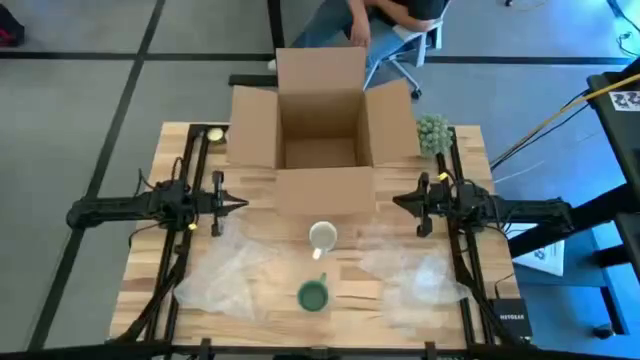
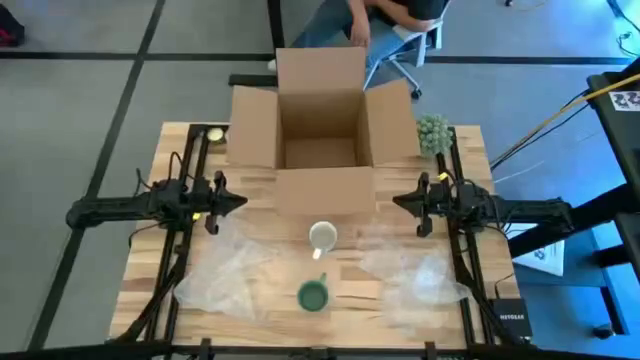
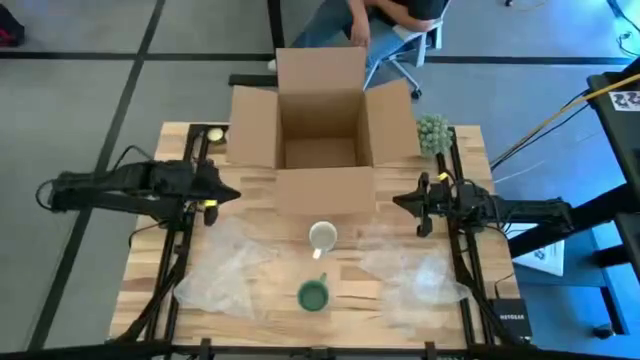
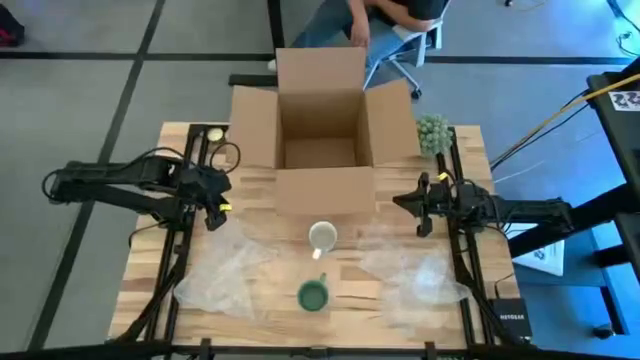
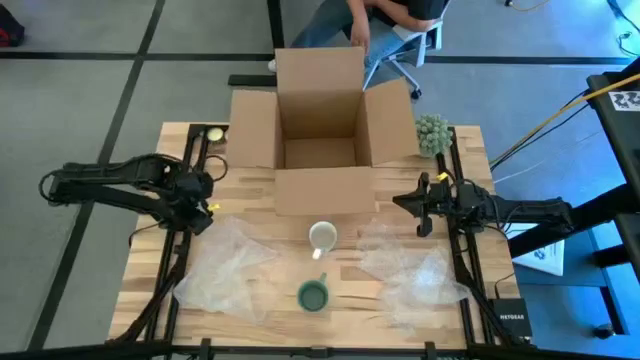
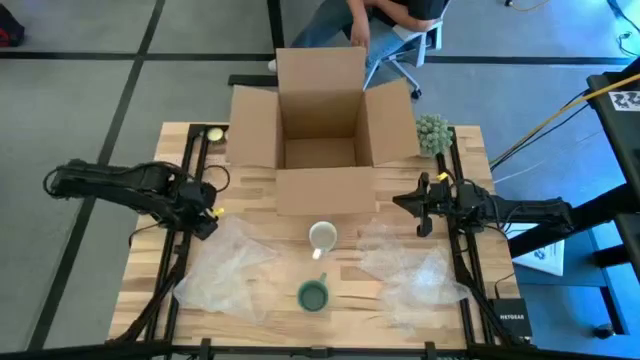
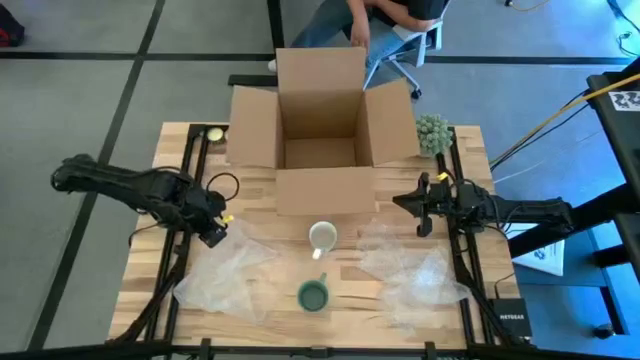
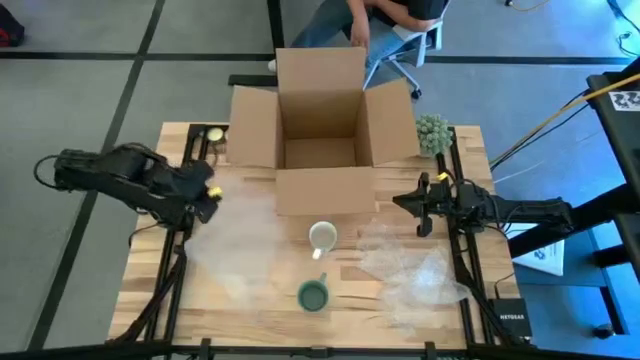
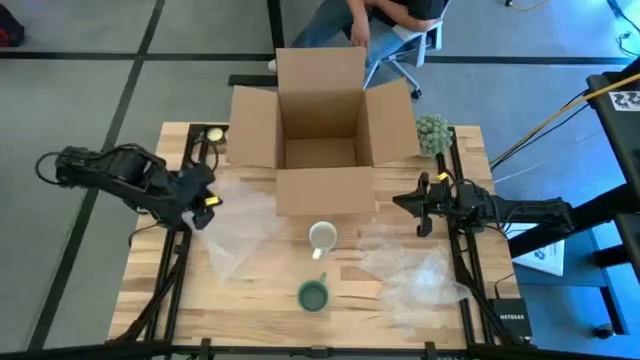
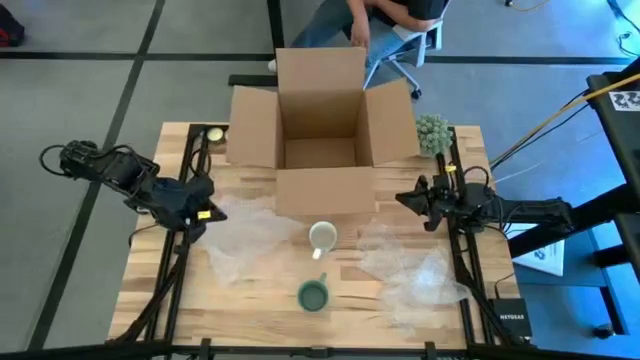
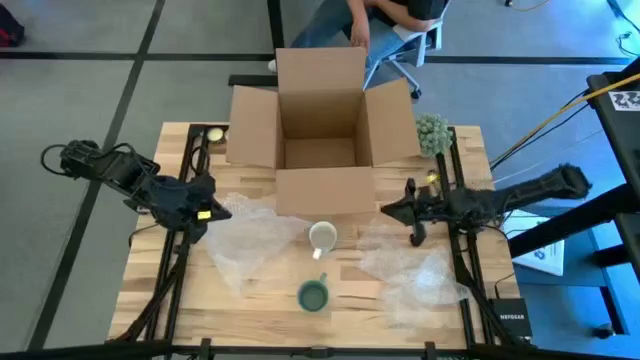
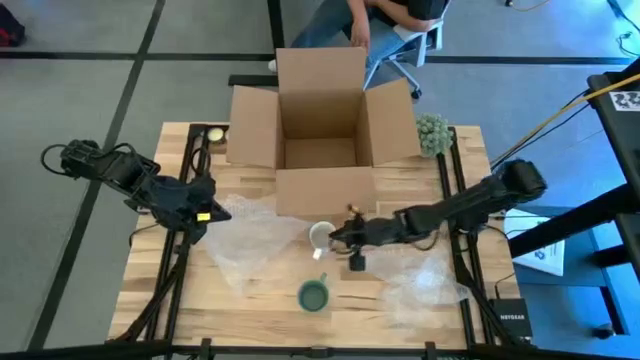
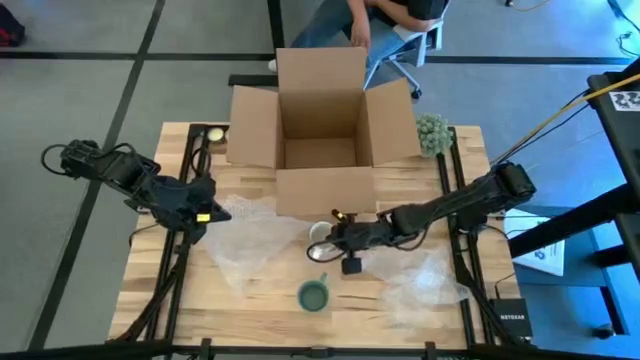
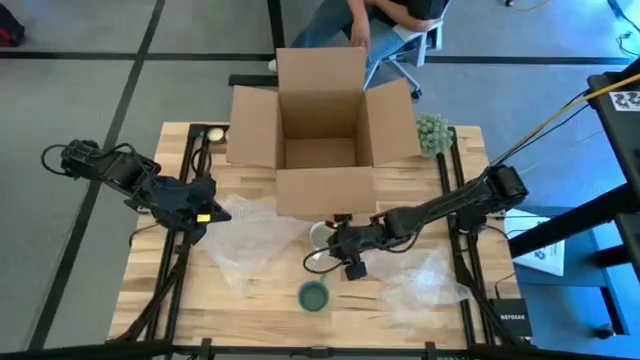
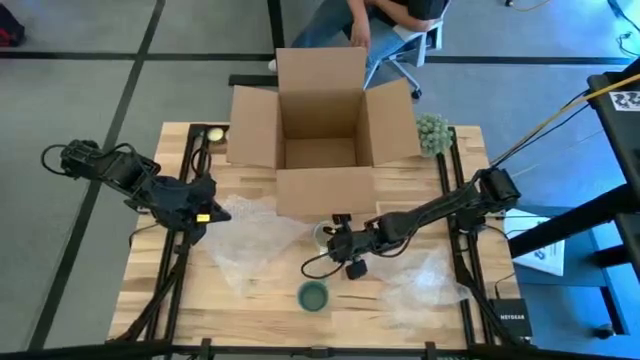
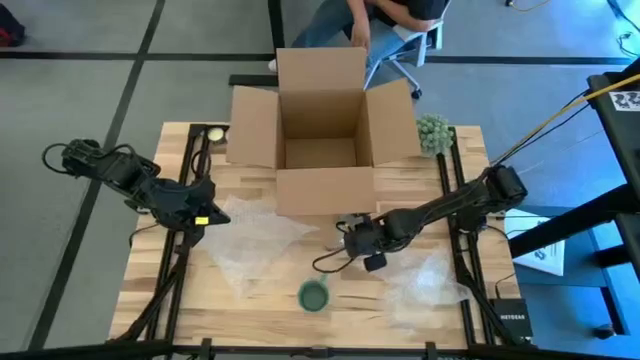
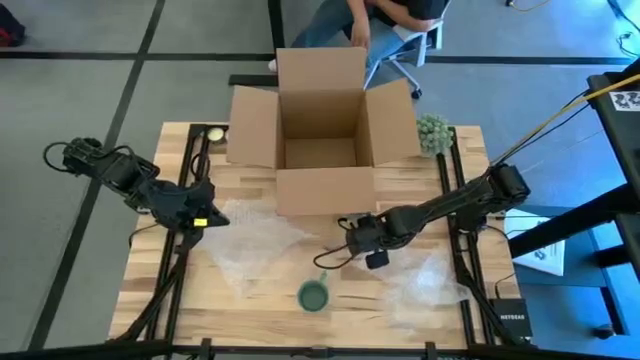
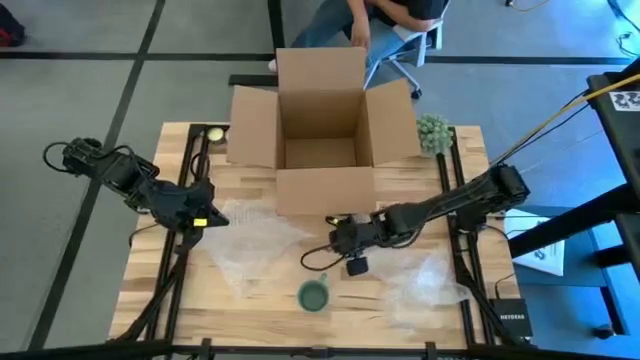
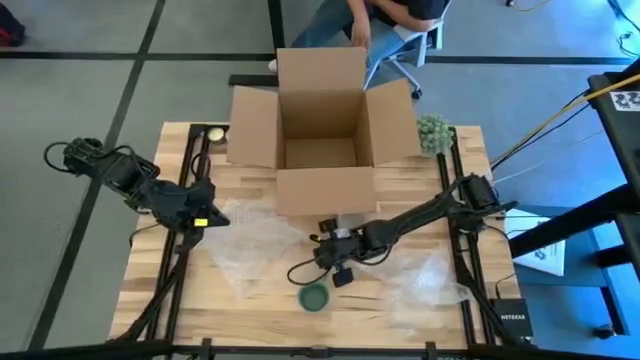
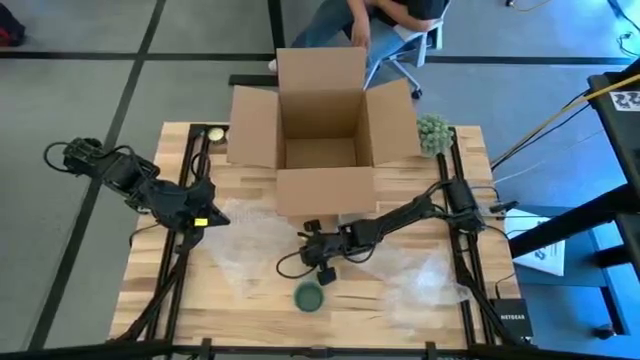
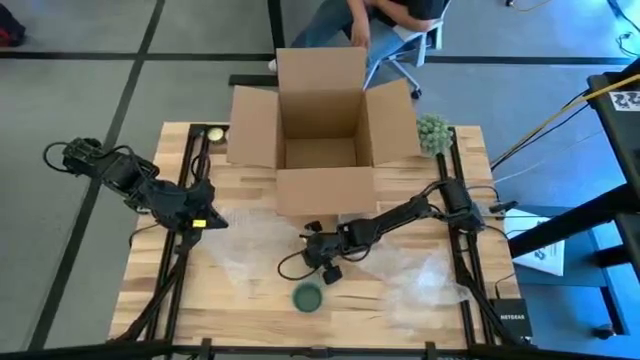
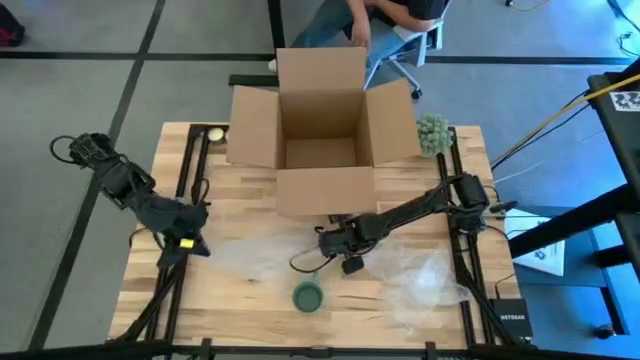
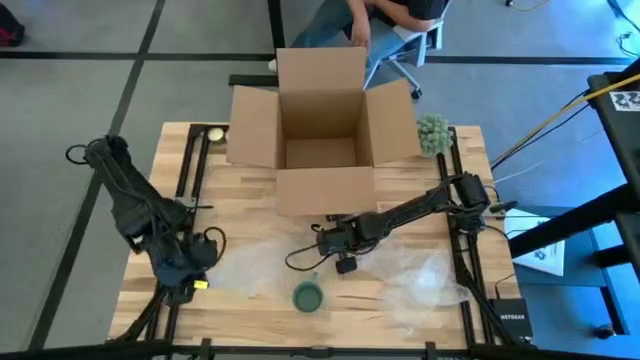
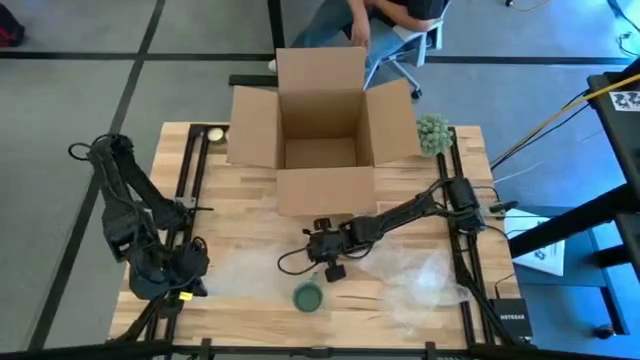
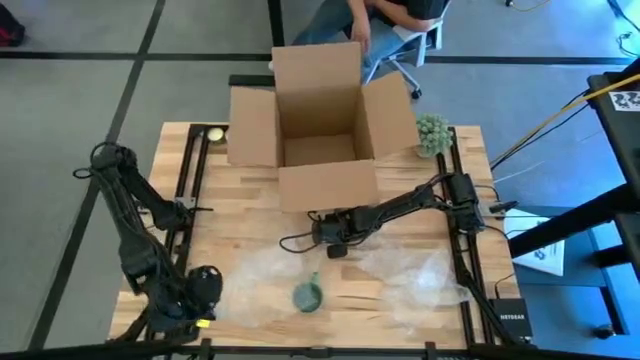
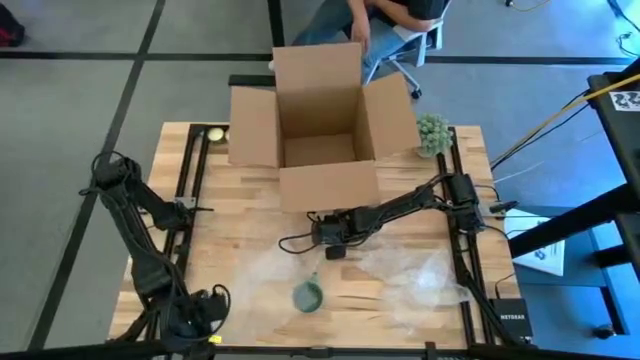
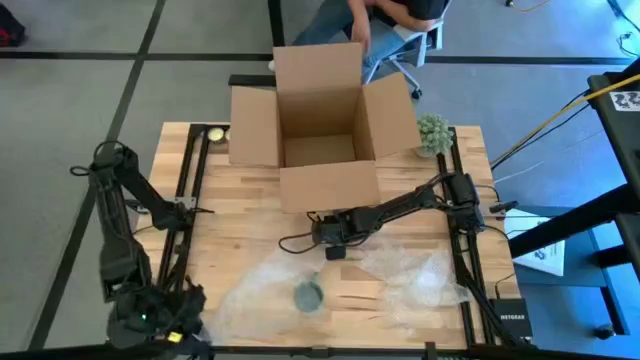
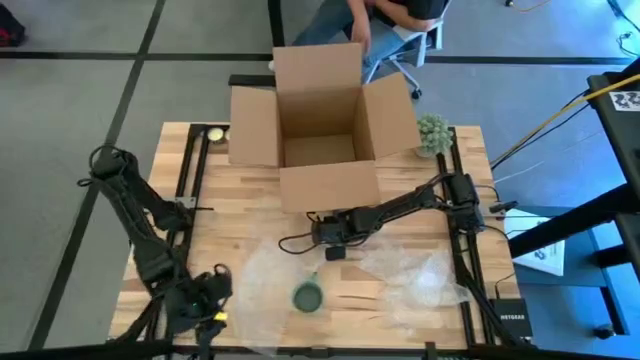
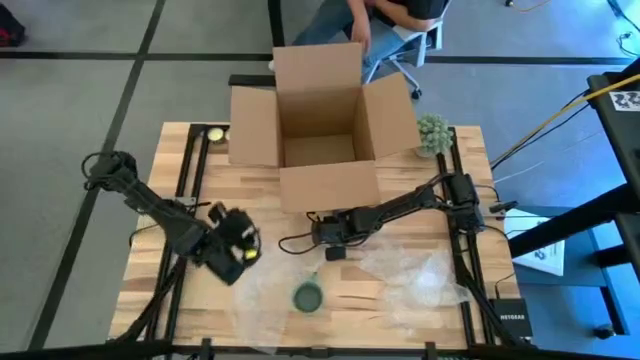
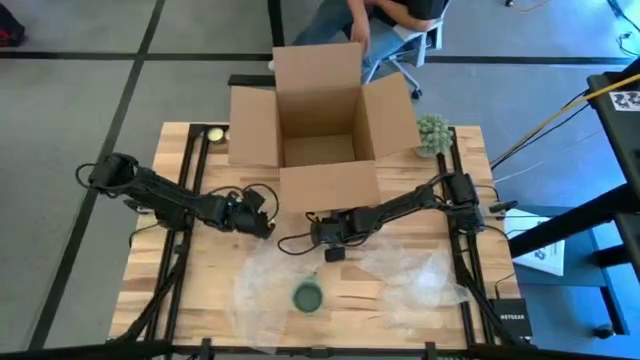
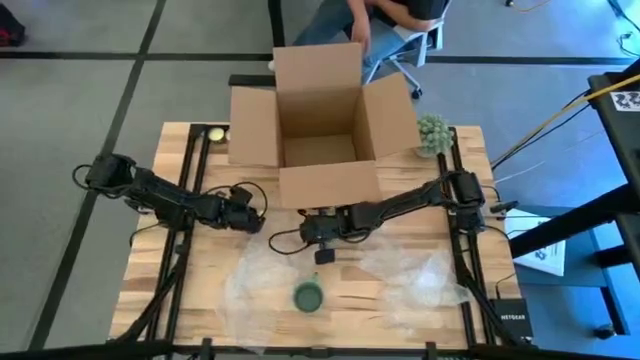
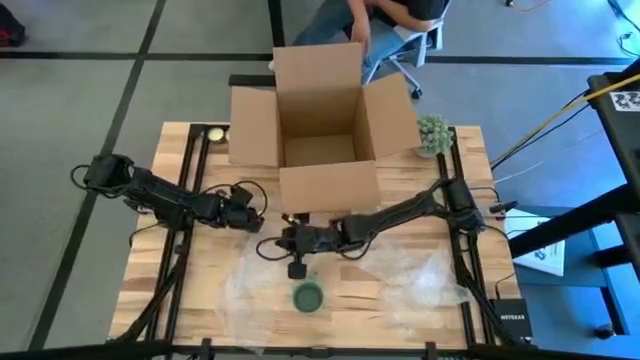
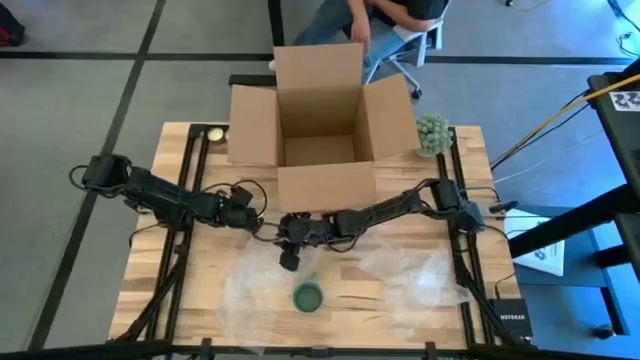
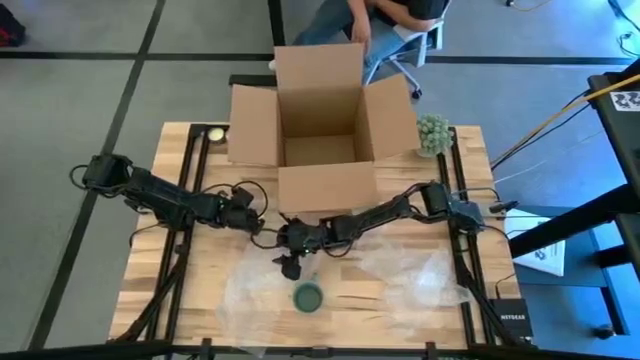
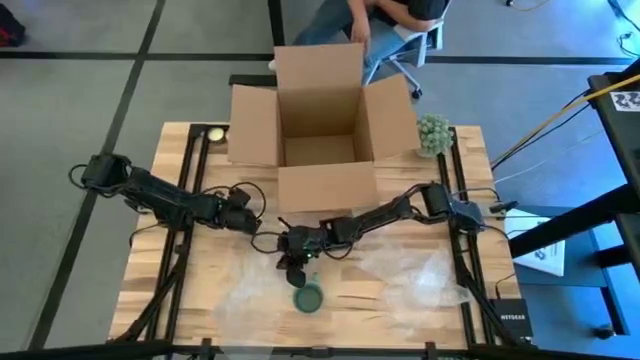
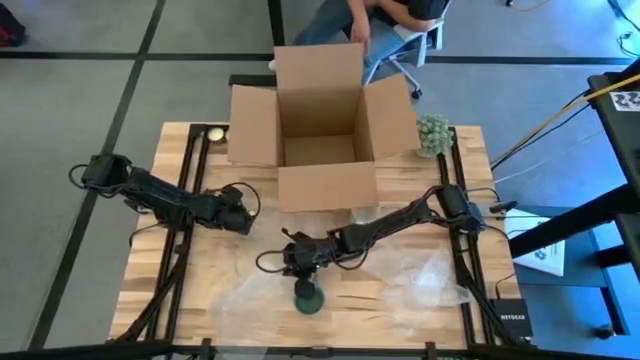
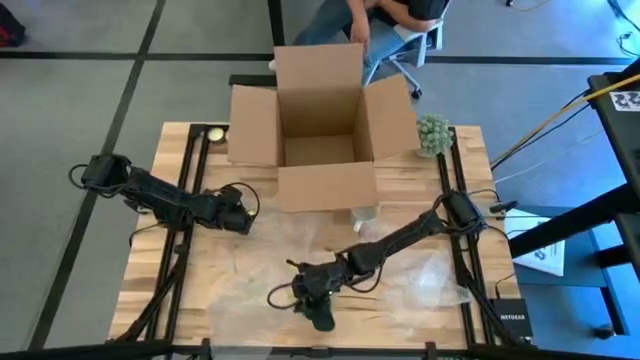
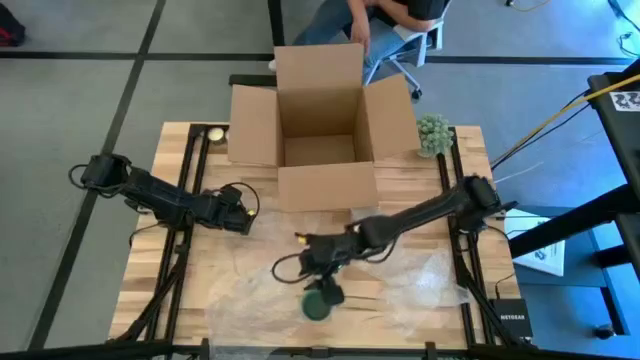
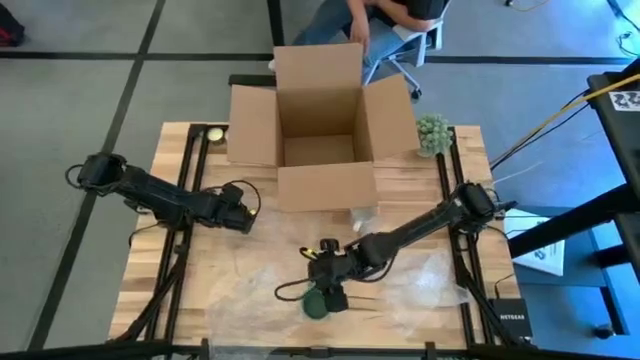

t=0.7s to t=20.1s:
Task: wrap mug
Wrap the green mug with bubble wrap
